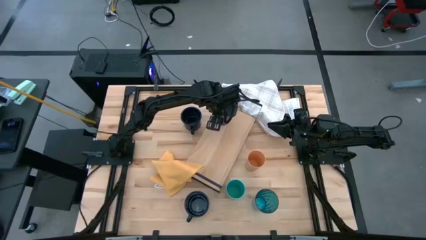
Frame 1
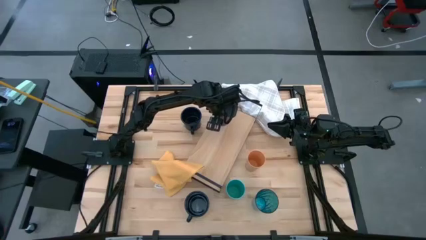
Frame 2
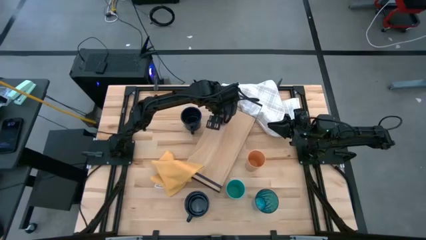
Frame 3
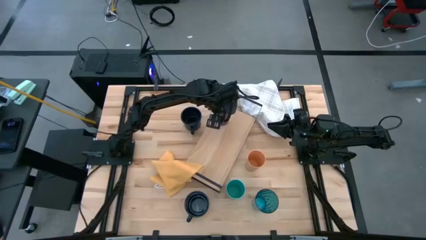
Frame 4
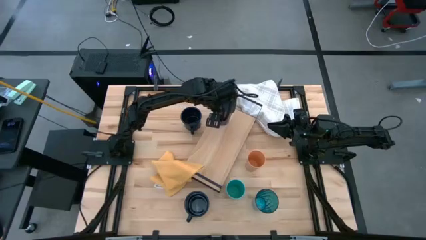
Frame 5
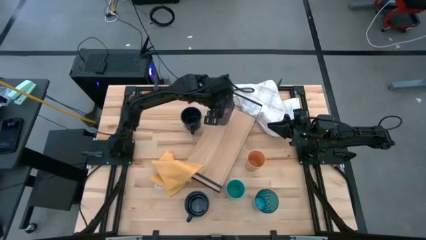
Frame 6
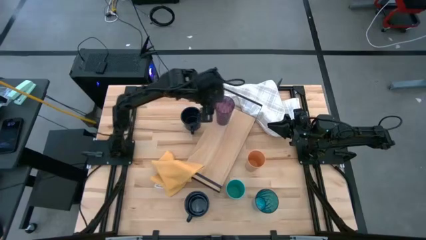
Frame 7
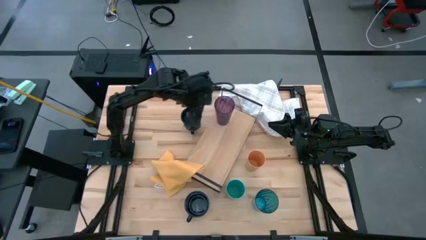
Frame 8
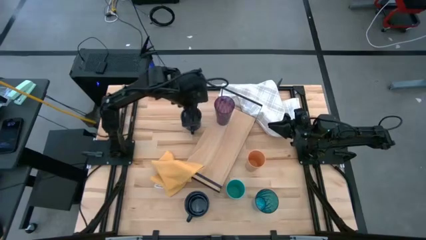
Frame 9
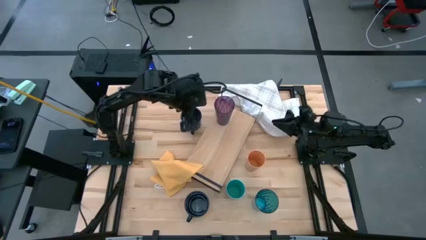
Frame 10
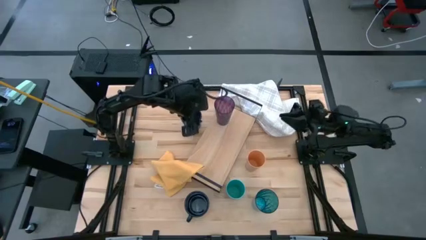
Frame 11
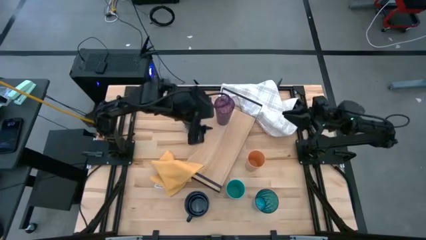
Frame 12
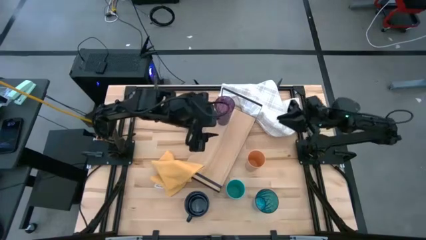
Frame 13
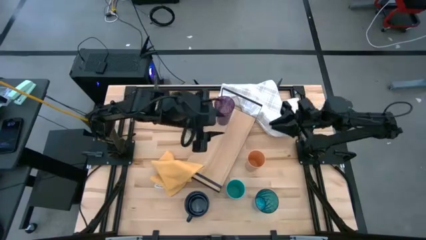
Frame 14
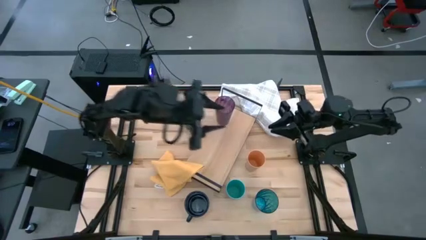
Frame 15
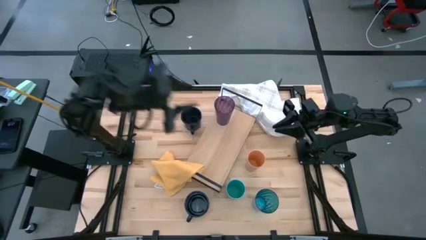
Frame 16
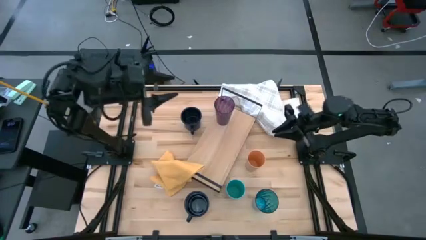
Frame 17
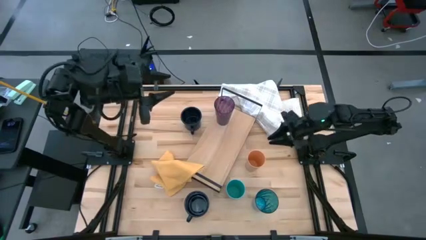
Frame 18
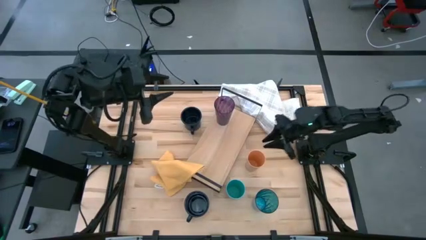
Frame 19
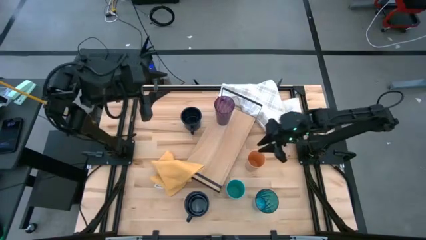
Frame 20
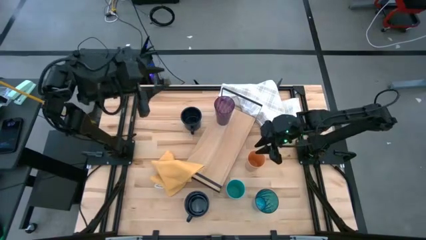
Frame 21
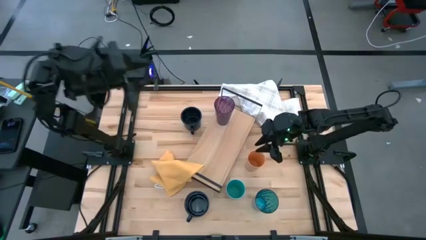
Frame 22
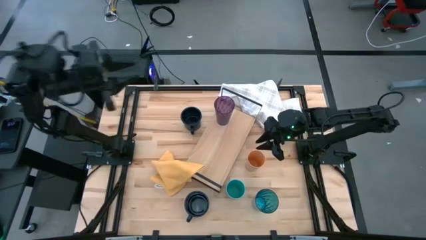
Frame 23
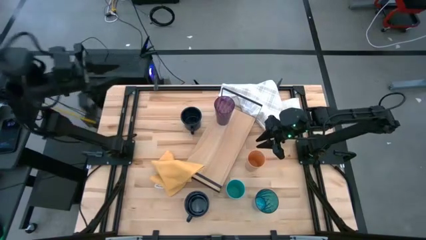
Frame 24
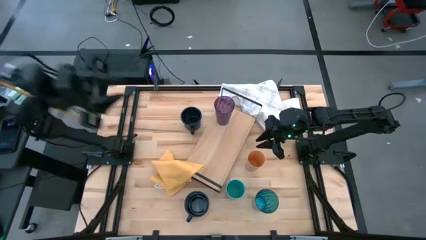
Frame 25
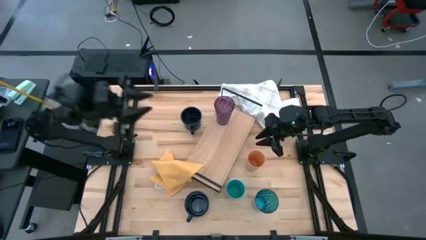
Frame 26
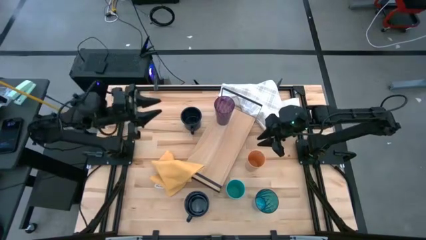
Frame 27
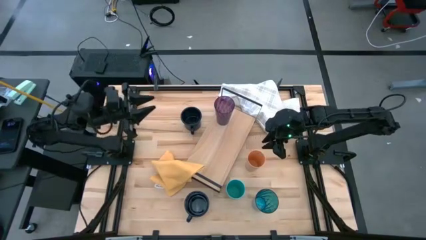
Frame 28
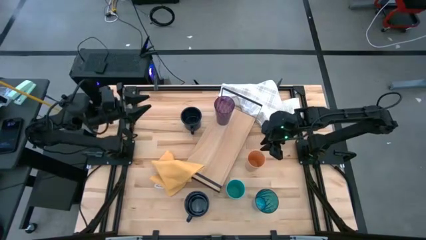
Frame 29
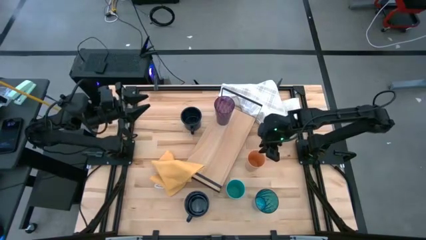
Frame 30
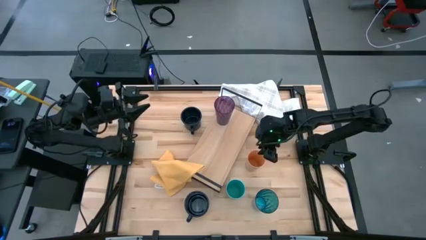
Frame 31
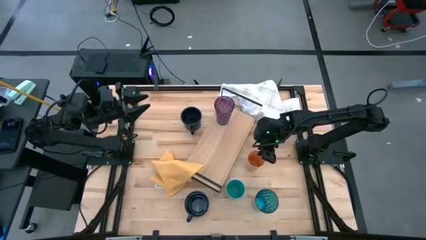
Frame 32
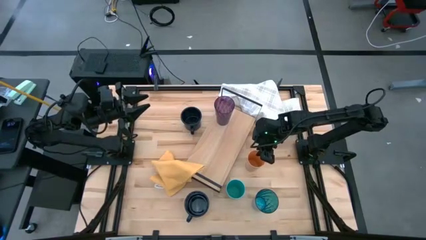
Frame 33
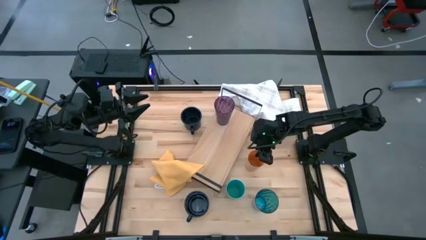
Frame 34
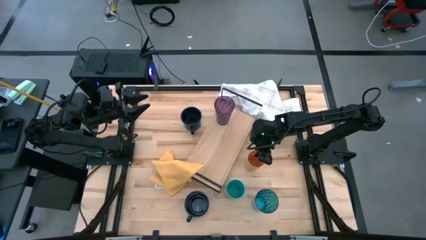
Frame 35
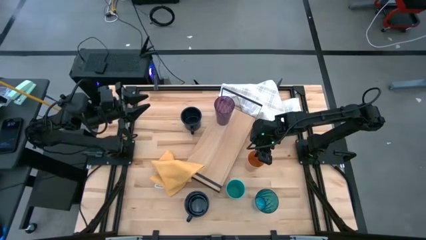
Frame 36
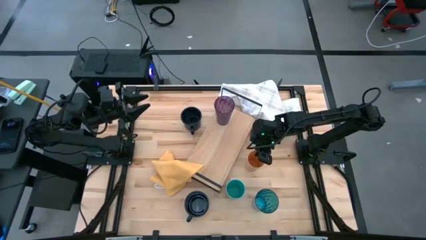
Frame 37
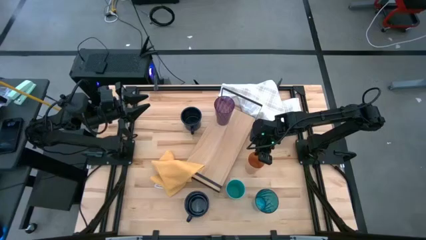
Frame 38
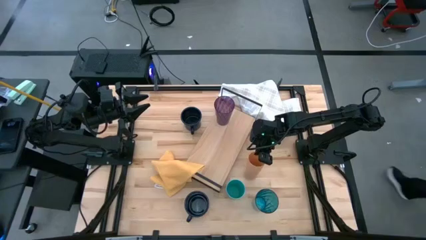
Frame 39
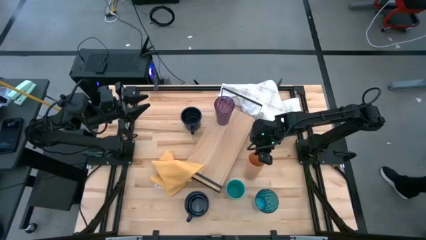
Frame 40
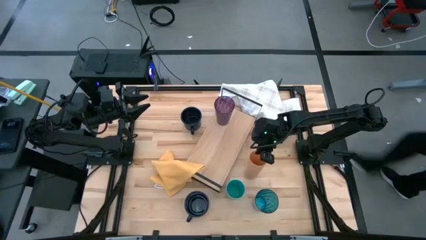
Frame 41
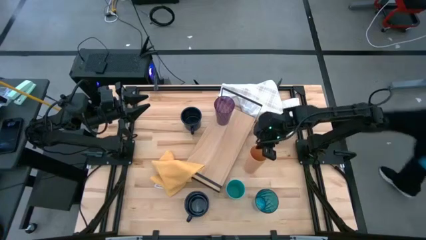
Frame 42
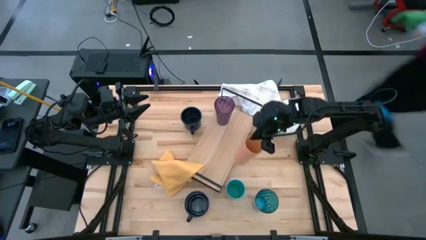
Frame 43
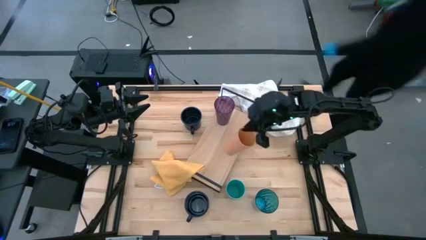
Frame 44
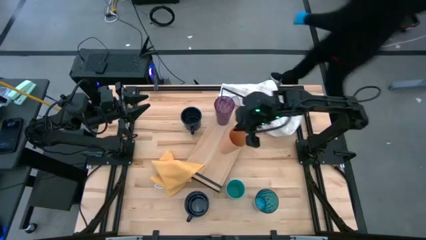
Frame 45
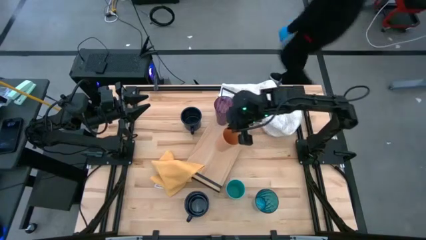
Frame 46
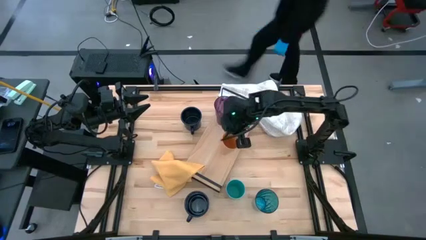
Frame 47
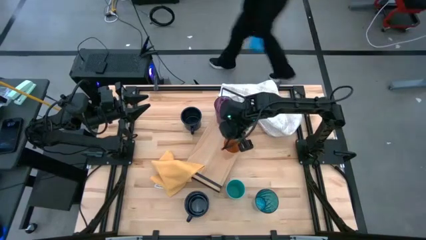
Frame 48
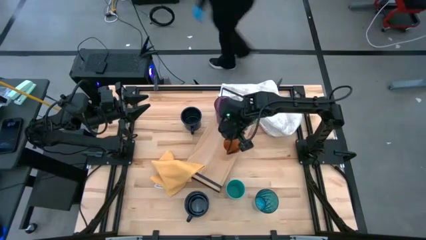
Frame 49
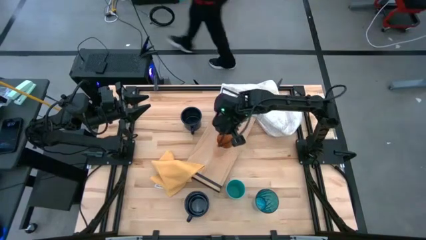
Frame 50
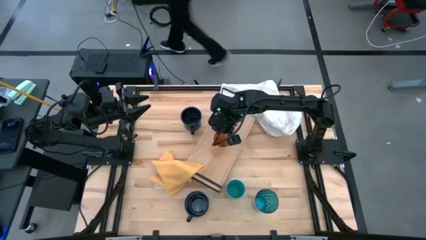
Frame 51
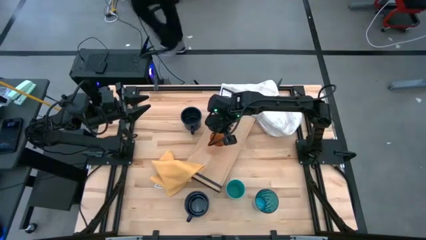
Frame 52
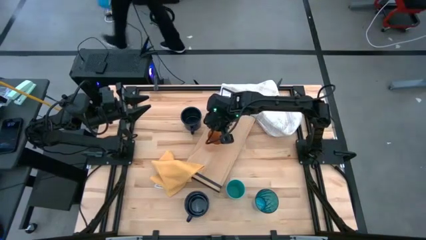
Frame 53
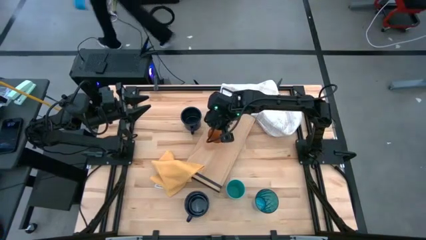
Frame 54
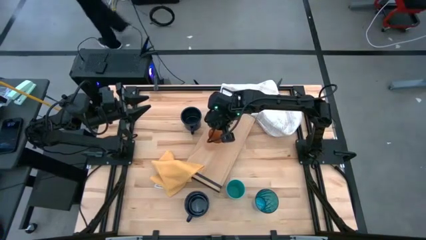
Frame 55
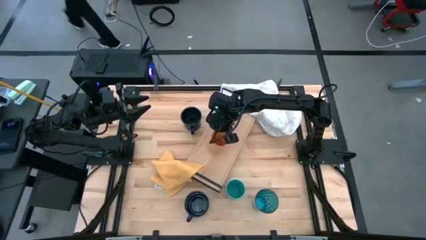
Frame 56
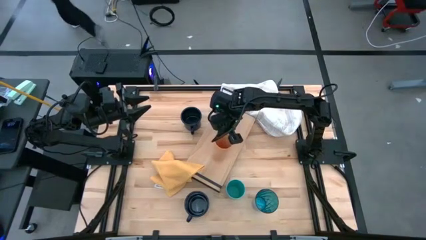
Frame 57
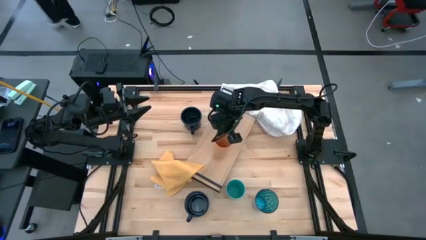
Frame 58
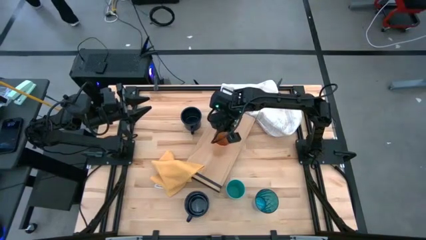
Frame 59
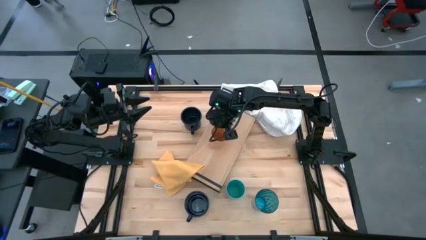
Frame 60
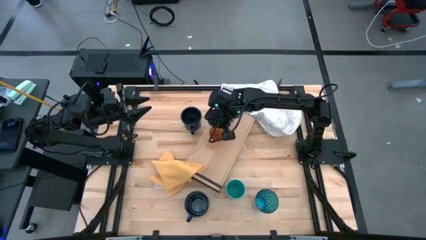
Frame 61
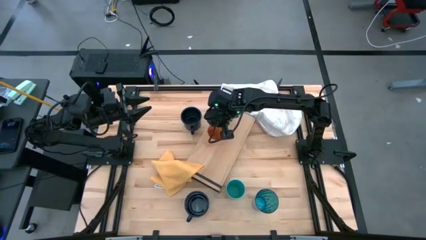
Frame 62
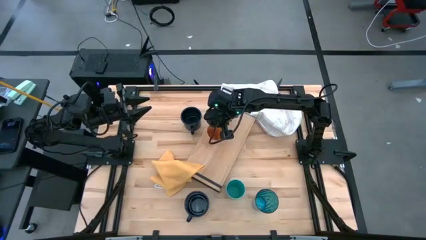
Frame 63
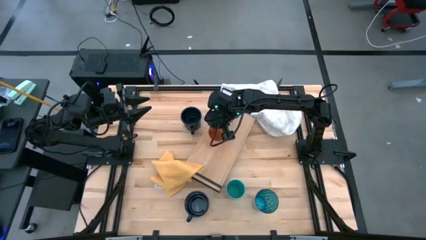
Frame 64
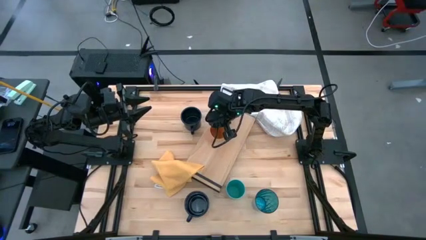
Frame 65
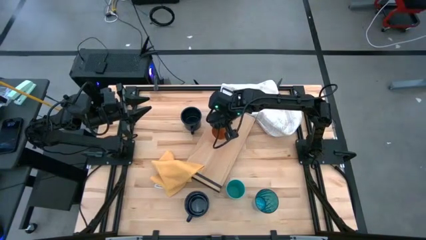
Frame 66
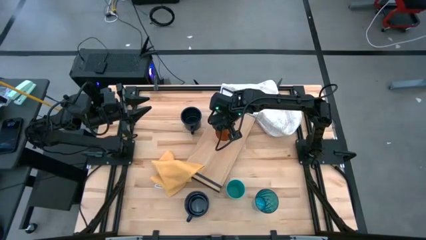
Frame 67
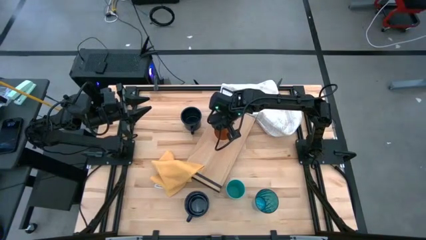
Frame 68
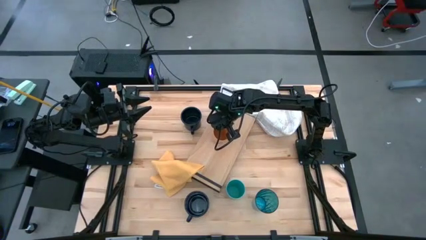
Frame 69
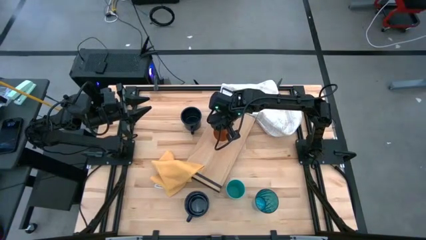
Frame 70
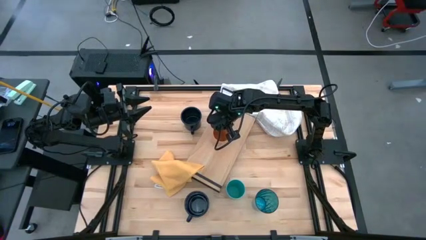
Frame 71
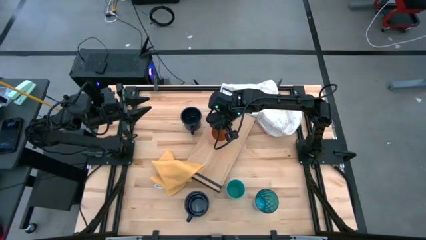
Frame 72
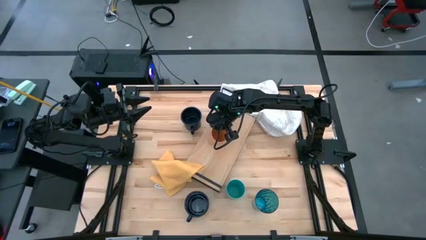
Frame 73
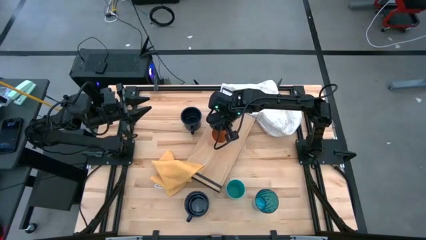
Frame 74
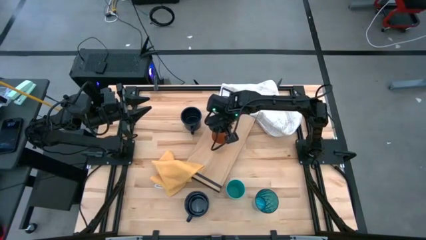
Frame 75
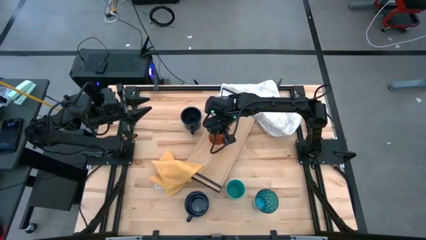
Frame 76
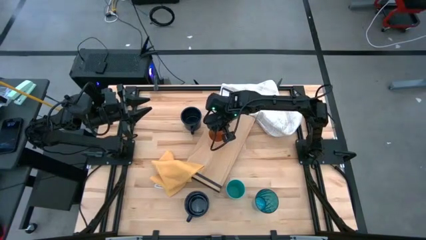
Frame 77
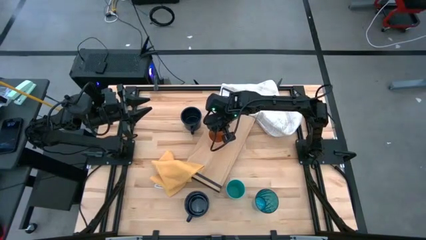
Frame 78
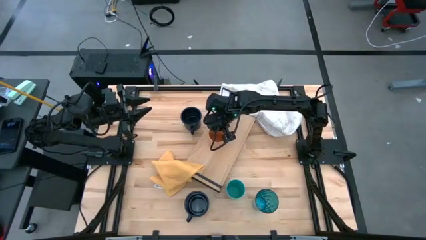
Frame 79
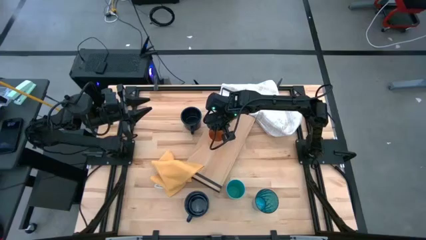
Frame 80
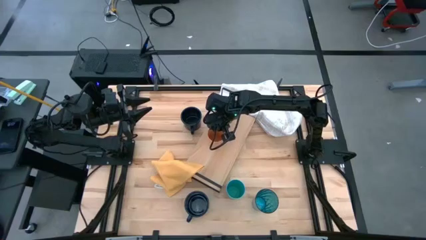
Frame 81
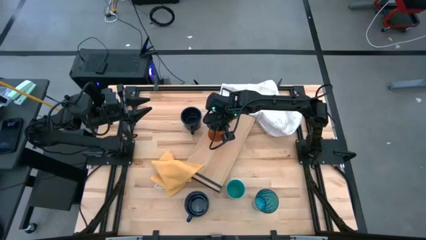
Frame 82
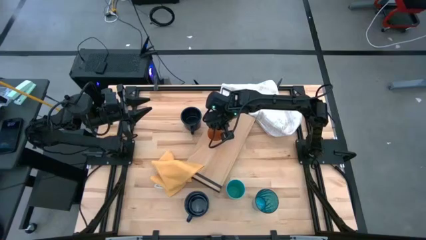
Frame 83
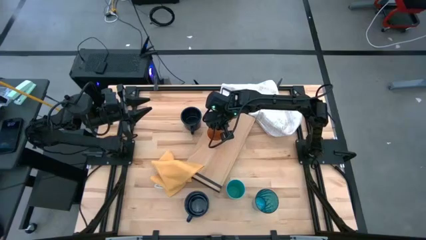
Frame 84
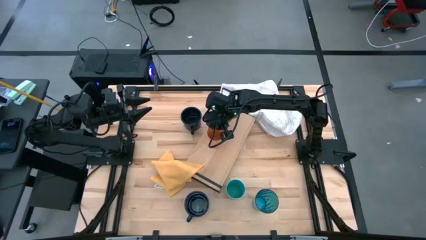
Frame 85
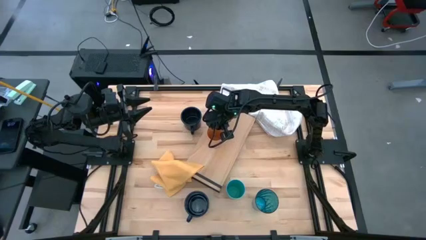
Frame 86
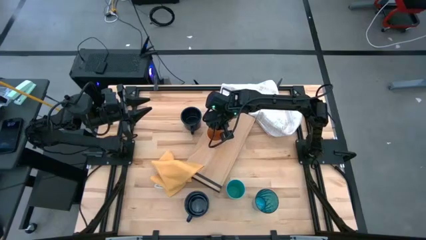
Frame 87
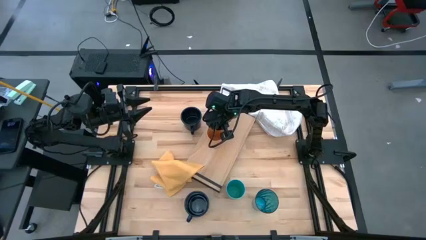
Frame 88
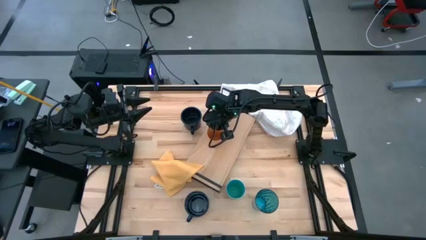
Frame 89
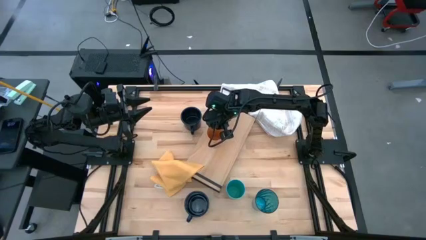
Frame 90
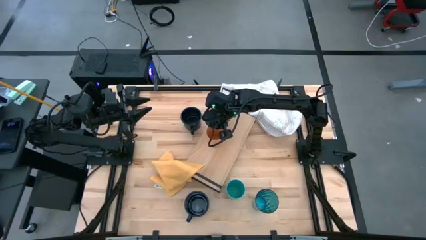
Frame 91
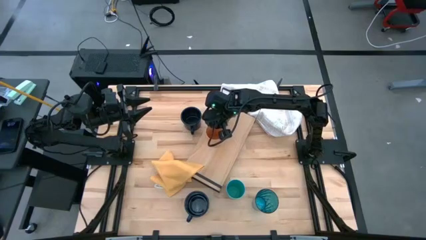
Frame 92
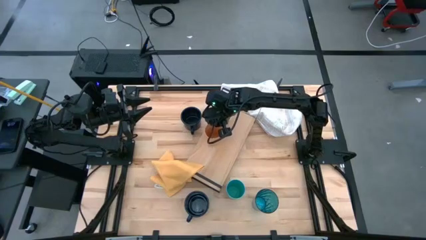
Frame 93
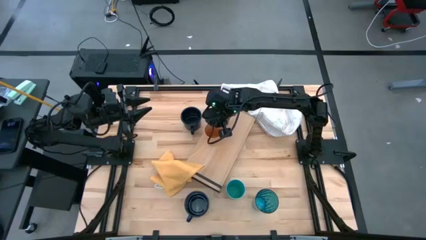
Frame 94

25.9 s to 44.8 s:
Task: Stack small to large cups/mugs on shelf
Put the orange cup on the shelf
